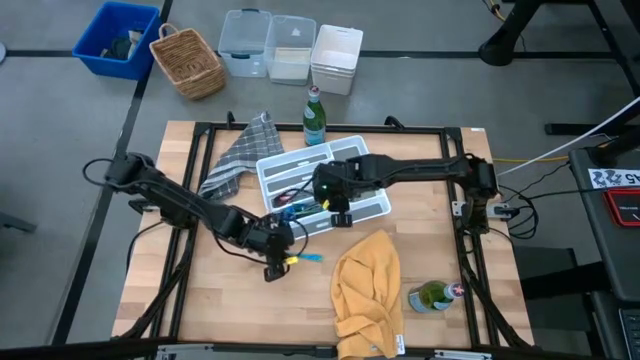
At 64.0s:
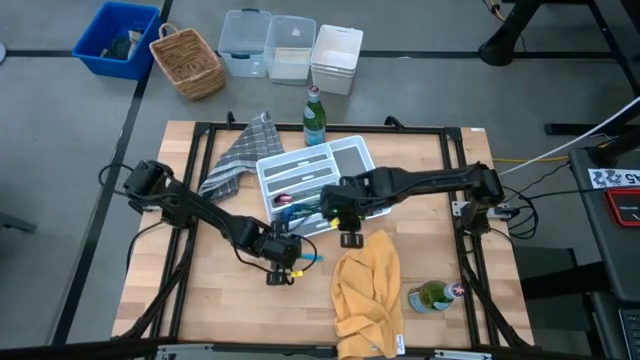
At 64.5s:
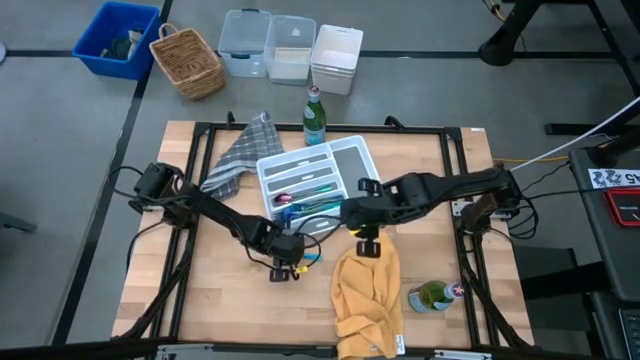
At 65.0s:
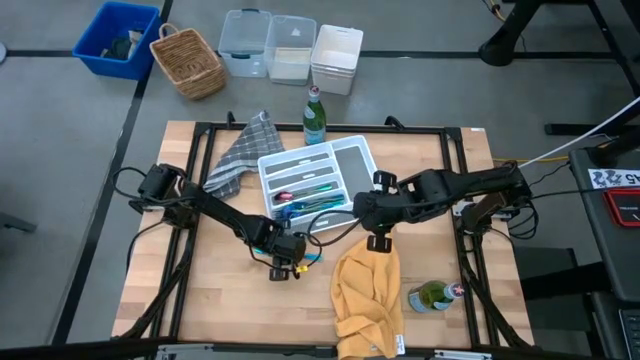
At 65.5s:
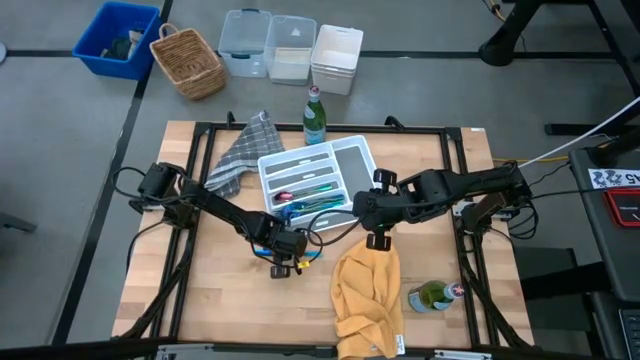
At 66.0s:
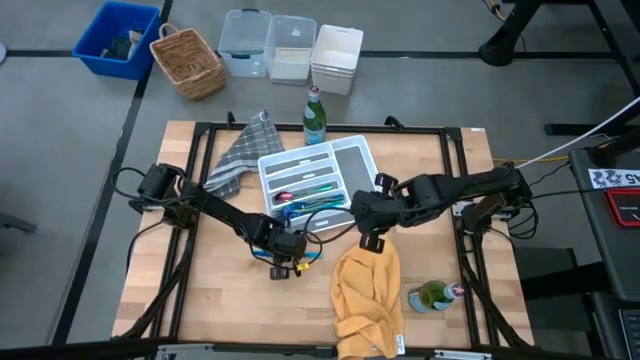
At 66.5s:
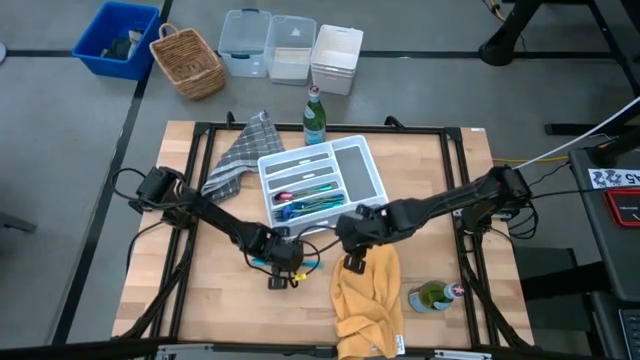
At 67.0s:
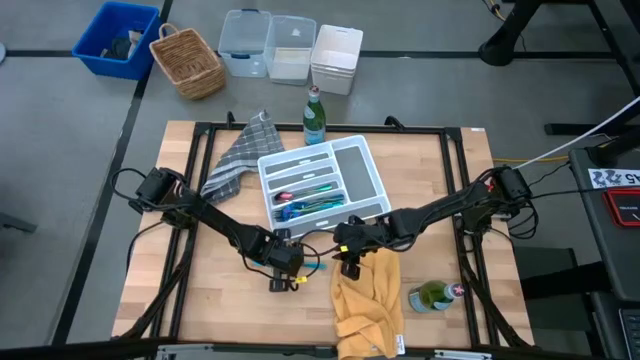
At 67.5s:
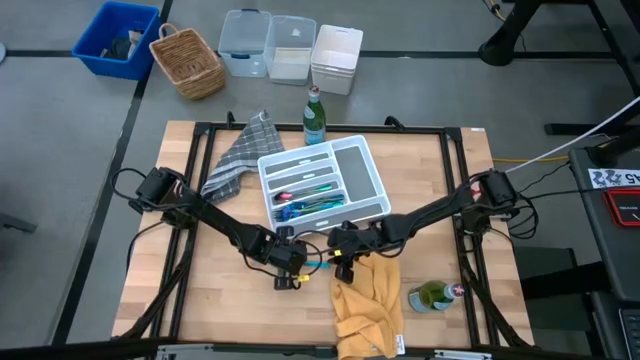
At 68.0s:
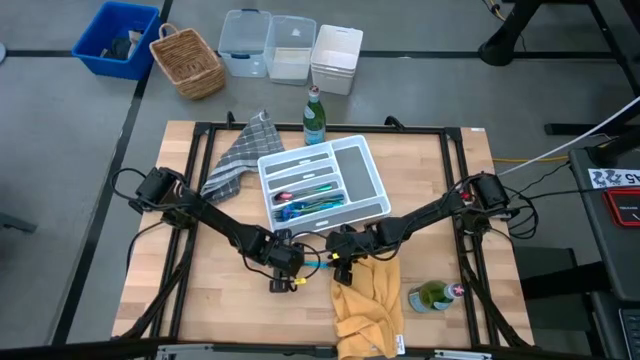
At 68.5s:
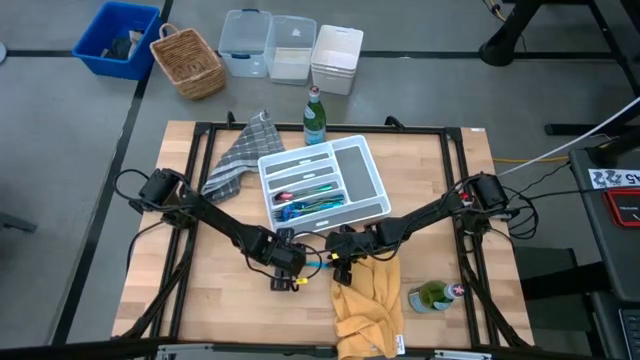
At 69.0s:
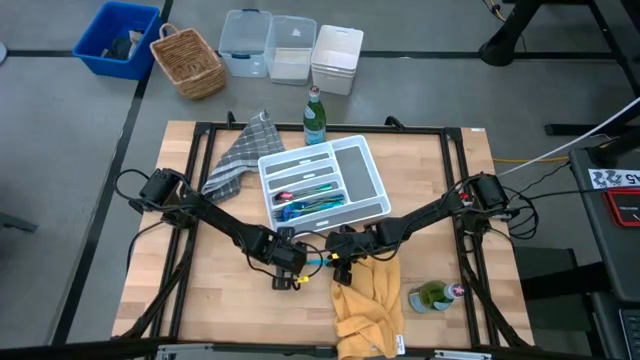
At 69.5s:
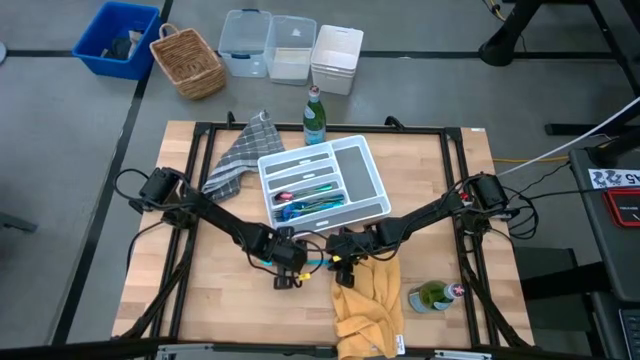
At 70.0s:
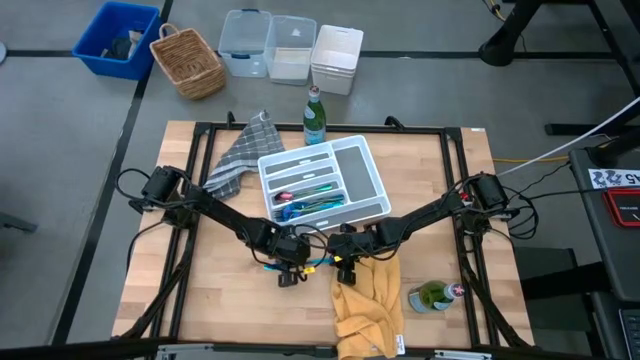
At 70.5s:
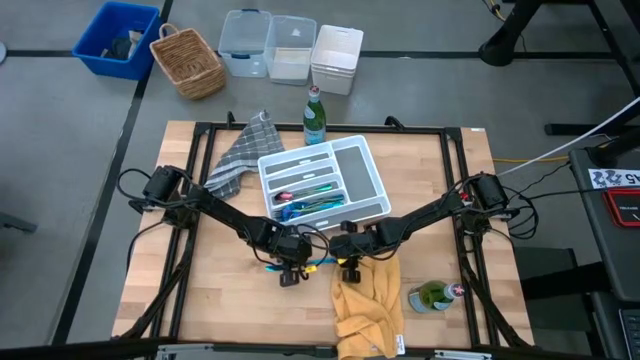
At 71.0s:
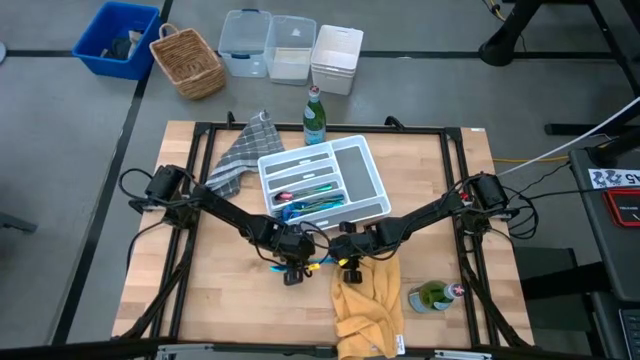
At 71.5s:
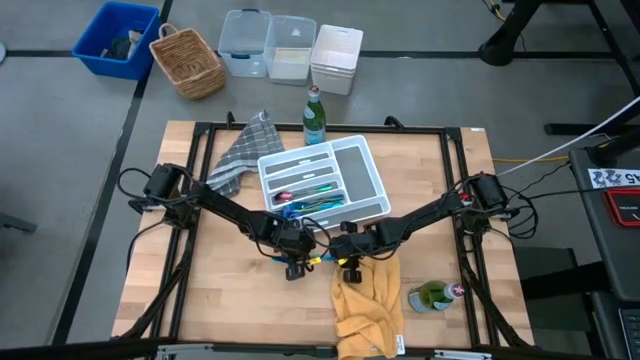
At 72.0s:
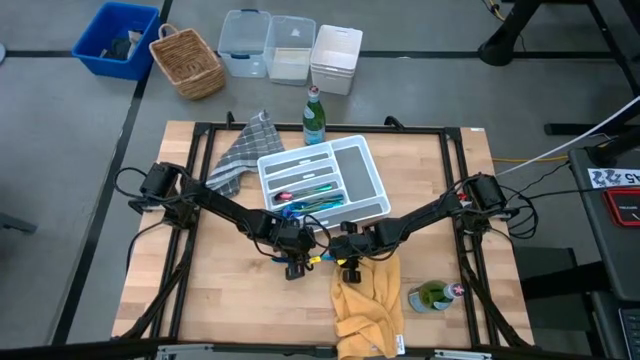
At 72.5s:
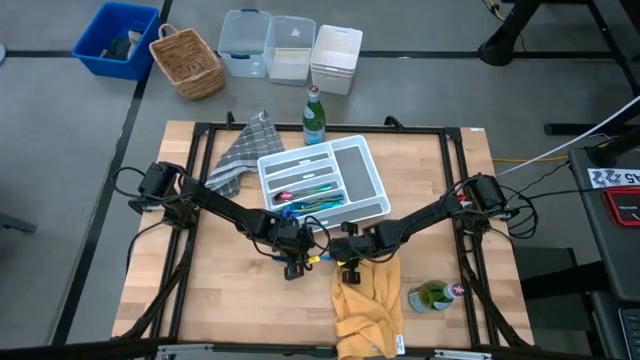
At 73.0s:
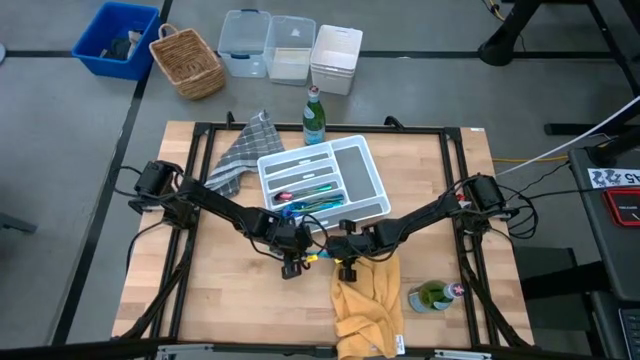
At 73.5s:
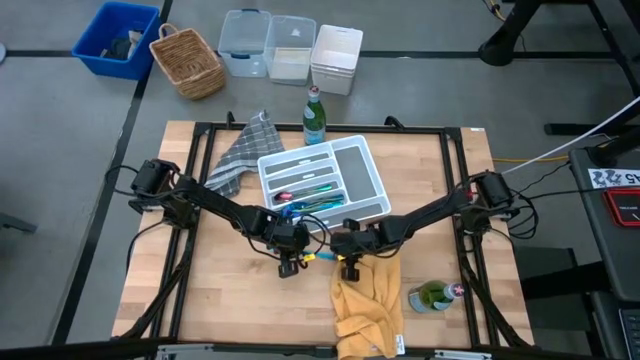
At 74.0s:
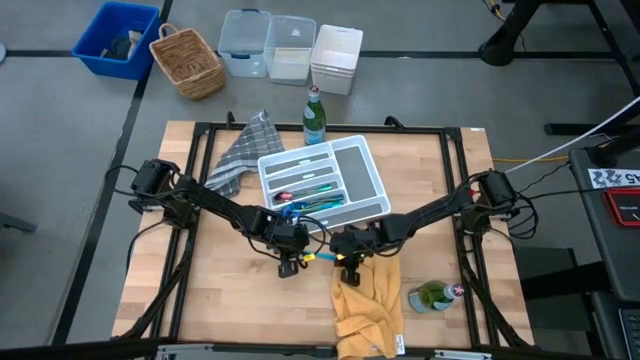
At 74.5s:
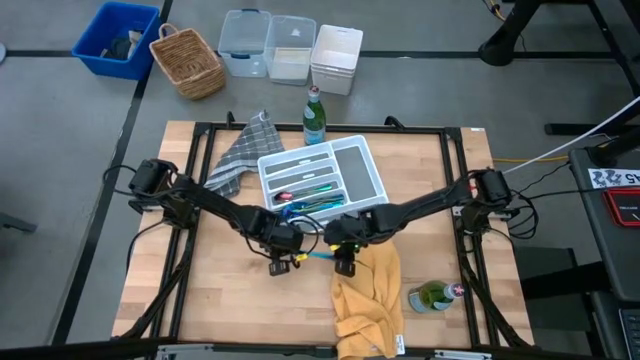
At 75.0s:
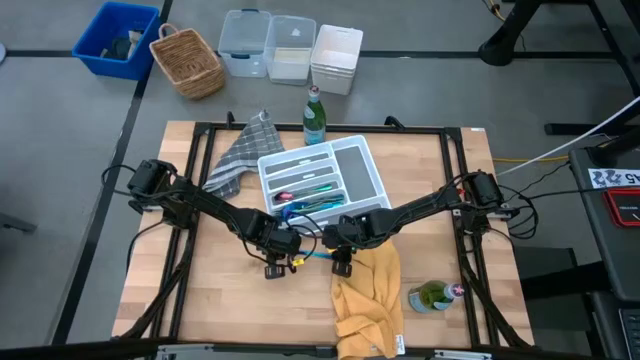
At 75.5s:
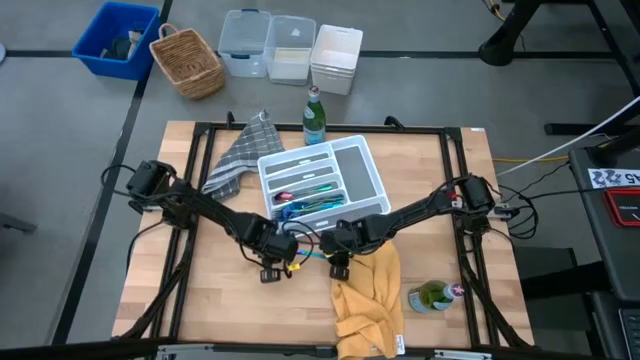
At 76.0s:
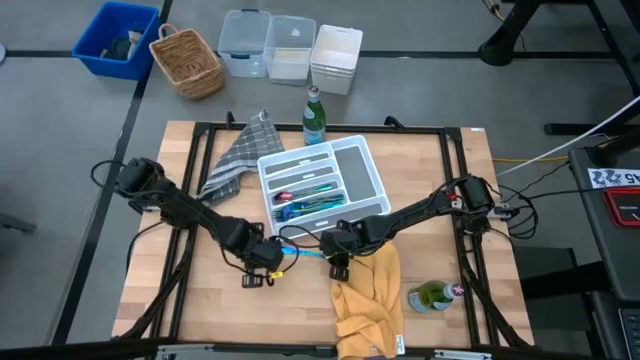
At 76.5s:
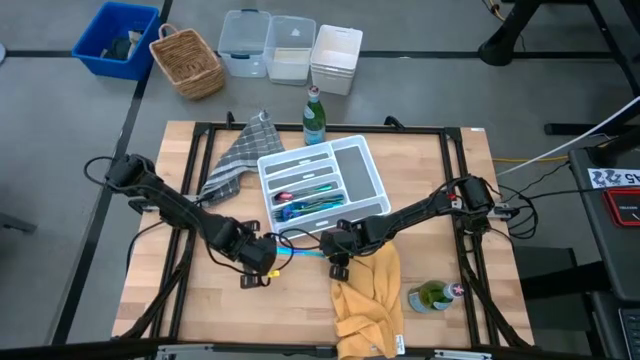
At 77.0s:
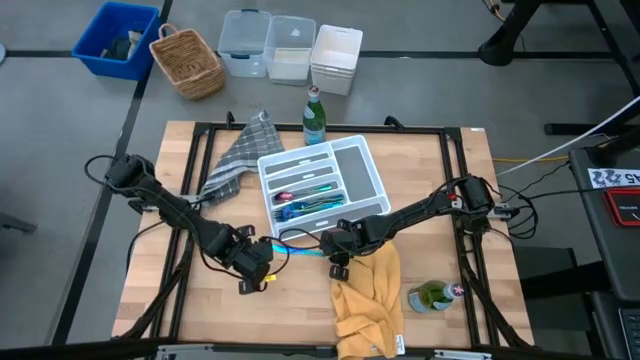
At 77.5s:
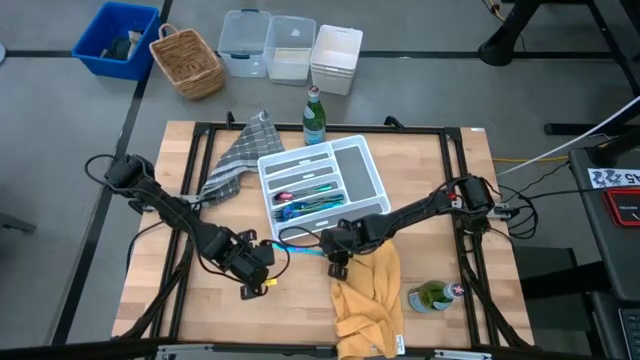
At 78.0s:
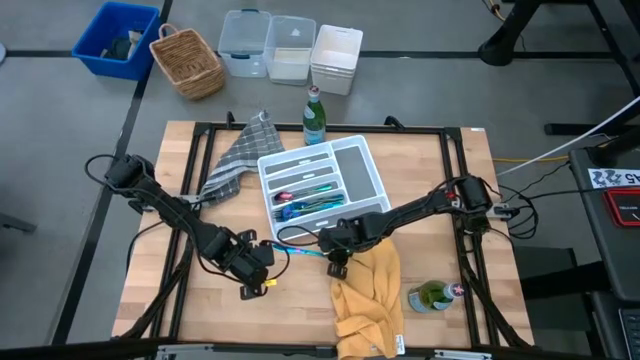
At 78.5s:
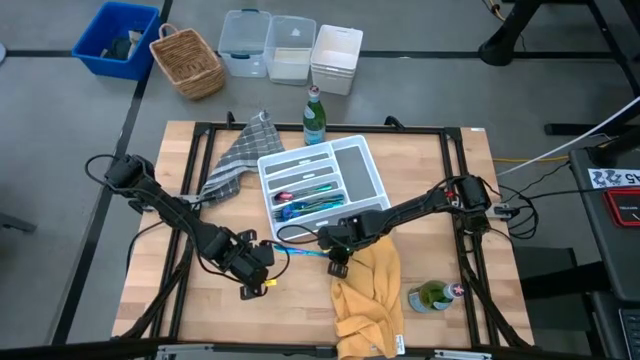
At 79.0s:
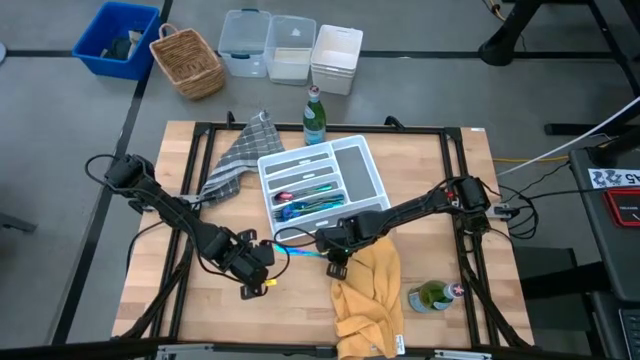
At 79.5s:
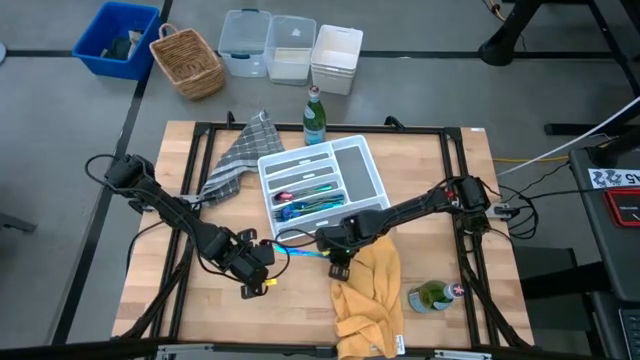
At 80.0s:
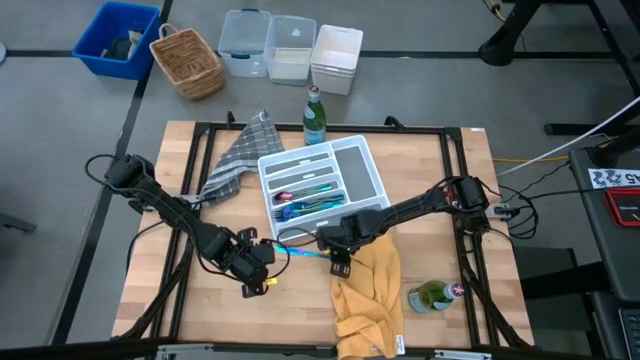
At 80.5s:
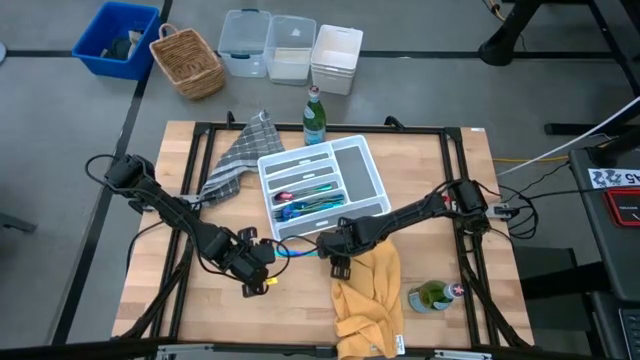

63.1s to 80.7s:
Task: Sort silverware
Put the table knife in the silverware tray

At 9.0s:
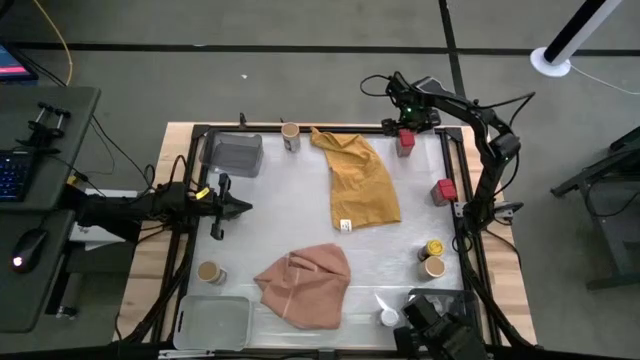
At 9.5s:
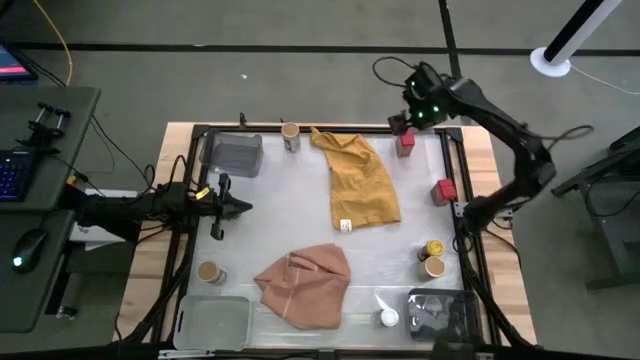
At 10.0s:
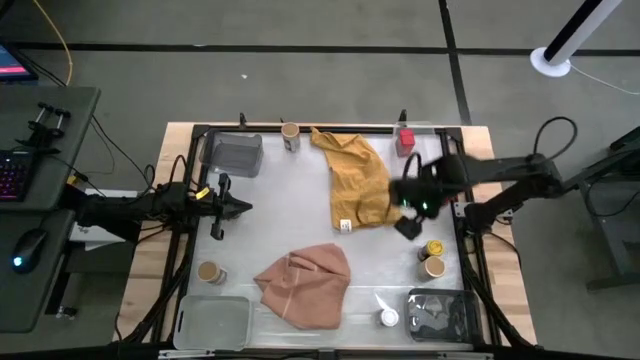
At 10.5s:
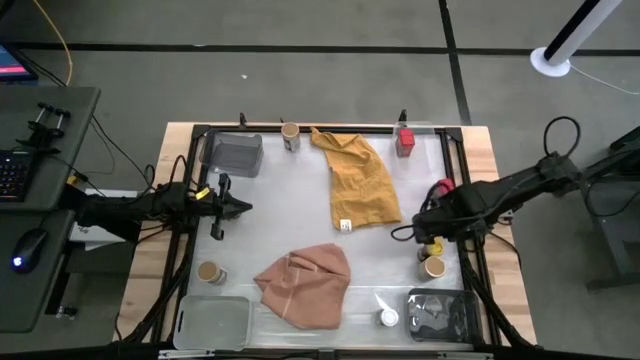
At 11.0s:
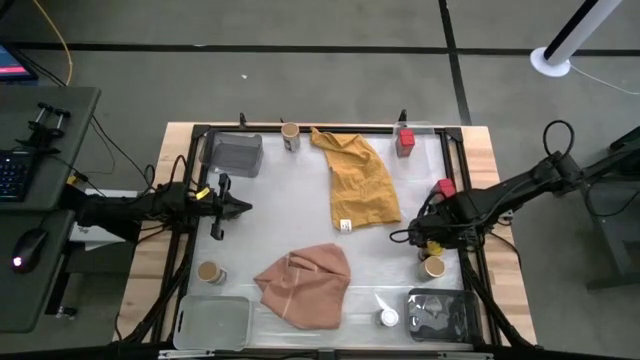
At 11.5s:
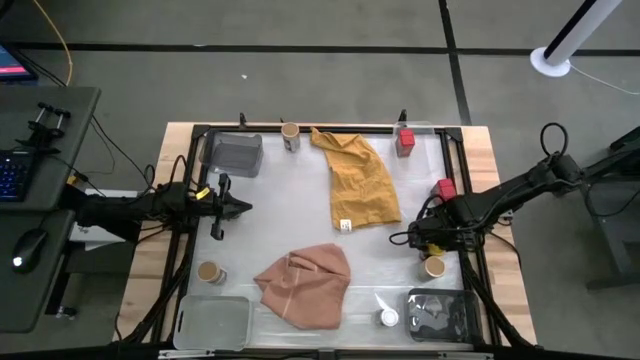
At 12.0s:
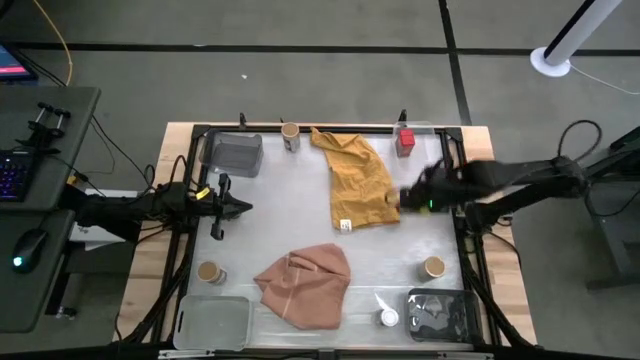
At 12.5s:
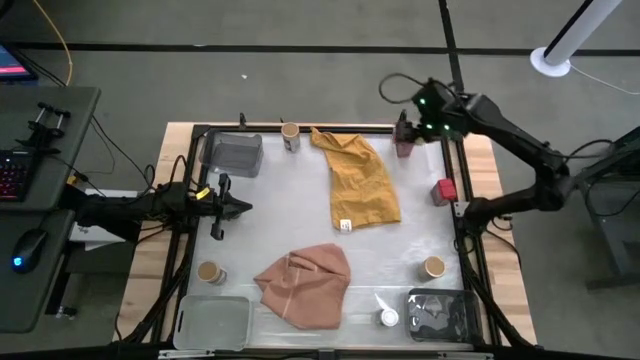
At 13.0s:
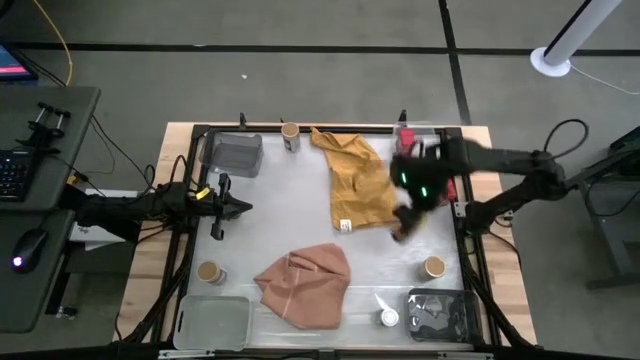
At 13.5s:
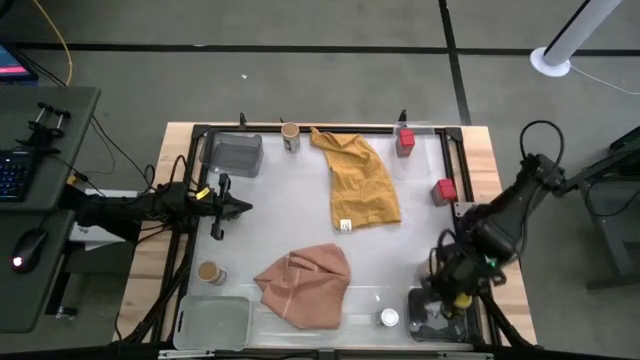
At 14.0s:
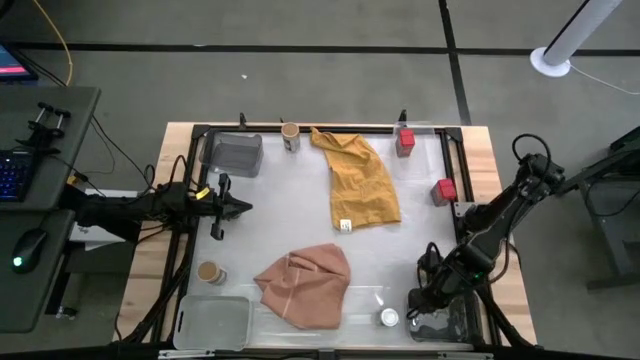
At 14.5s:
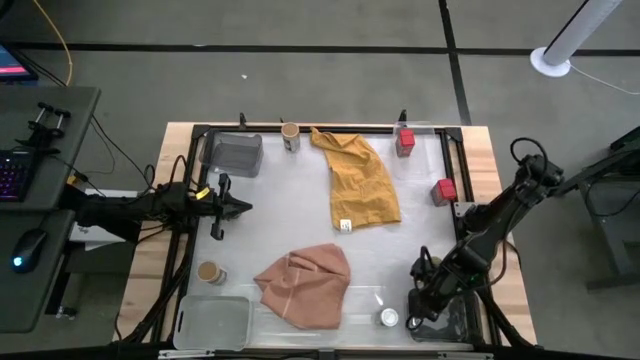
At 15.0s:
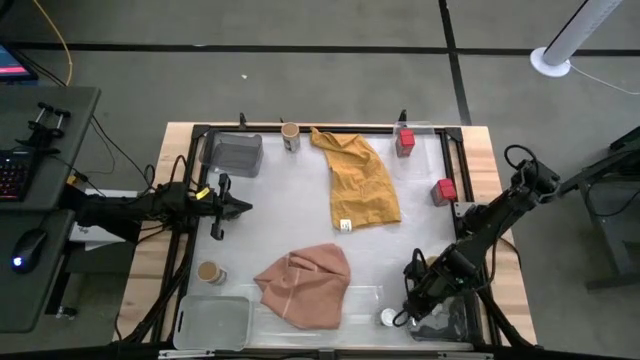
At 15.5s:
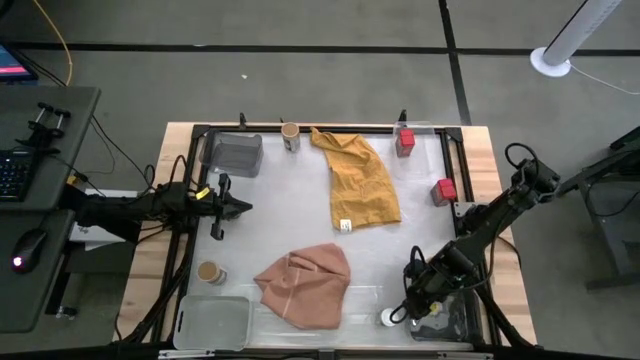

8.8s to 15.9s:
Task: Sort spices by type
Put the right yellow seasoning bottle into the bottom right black bin
